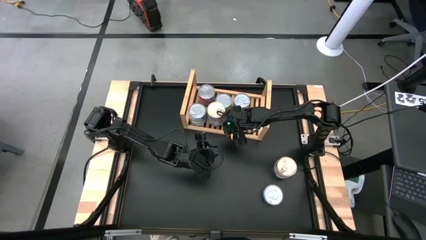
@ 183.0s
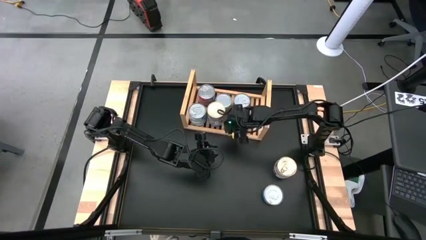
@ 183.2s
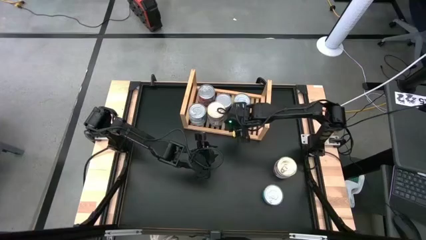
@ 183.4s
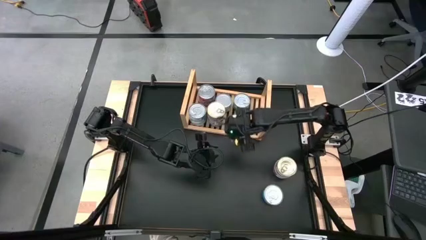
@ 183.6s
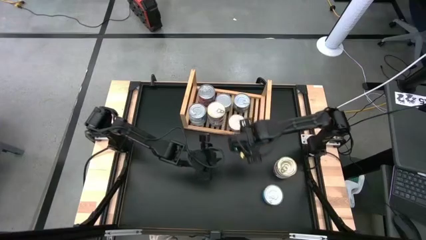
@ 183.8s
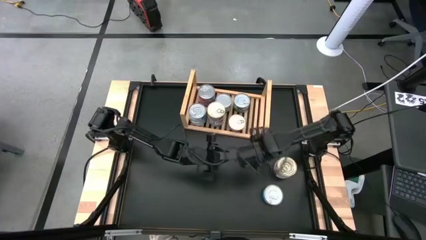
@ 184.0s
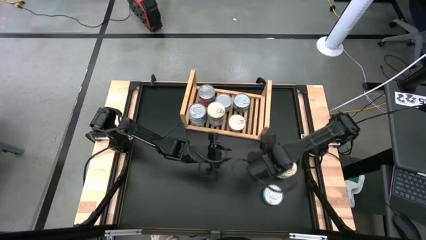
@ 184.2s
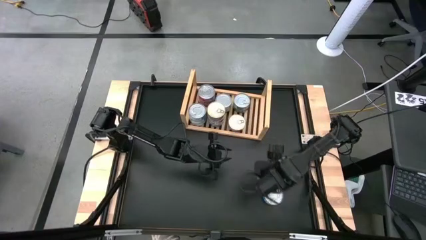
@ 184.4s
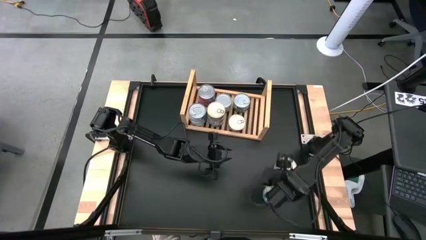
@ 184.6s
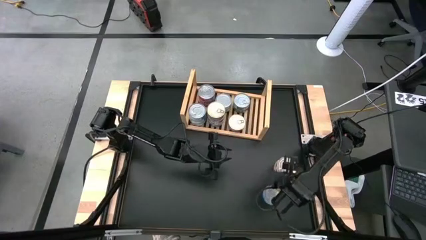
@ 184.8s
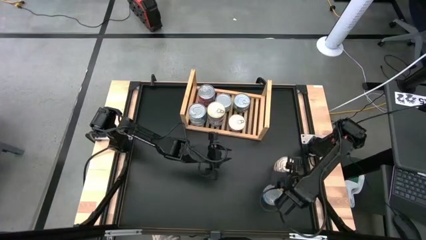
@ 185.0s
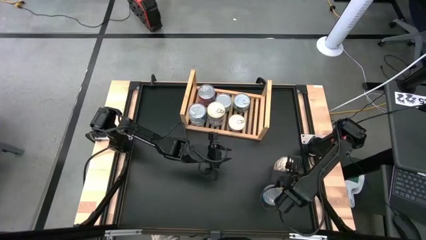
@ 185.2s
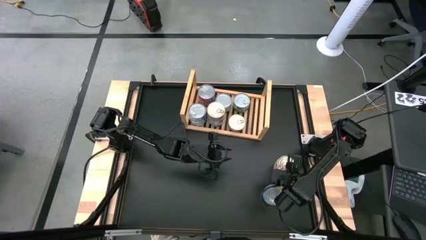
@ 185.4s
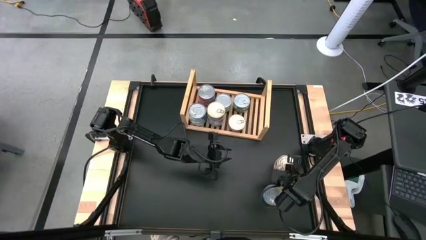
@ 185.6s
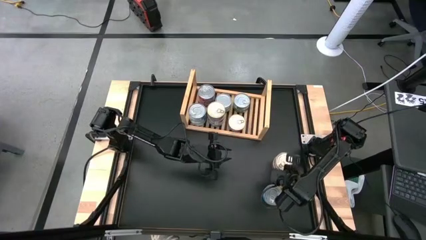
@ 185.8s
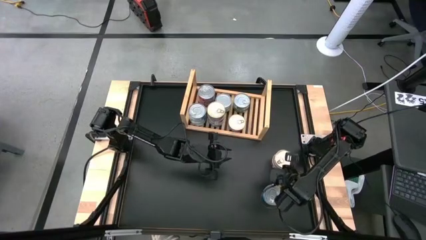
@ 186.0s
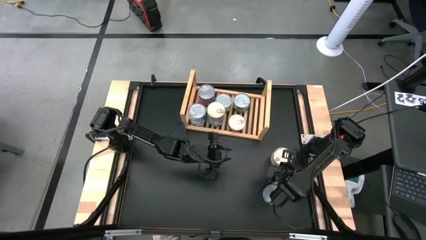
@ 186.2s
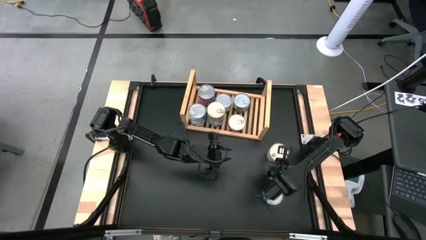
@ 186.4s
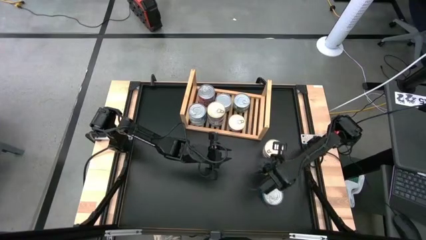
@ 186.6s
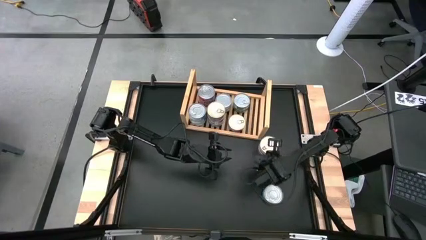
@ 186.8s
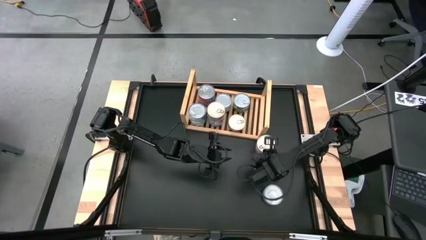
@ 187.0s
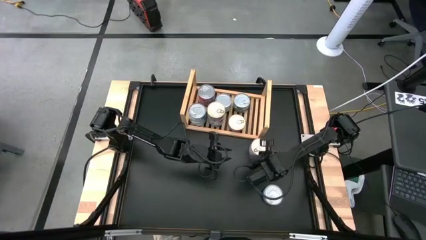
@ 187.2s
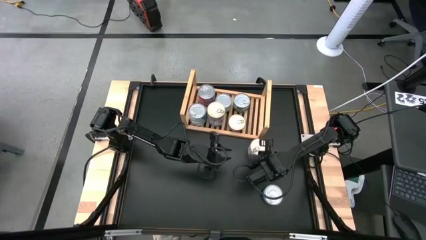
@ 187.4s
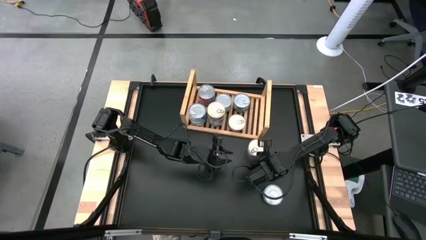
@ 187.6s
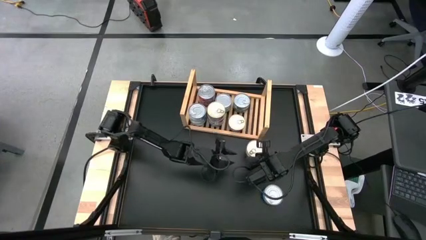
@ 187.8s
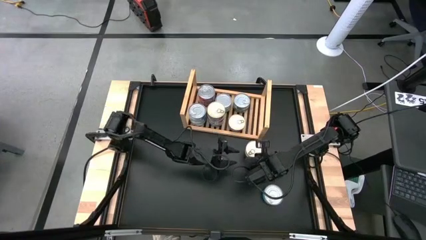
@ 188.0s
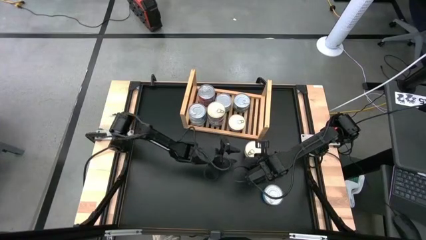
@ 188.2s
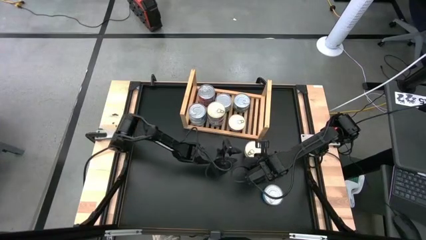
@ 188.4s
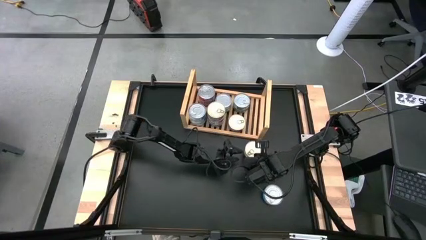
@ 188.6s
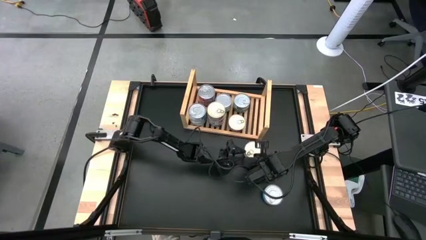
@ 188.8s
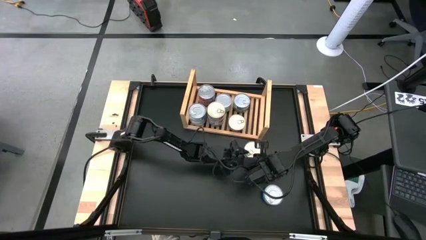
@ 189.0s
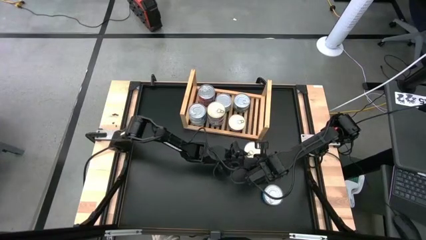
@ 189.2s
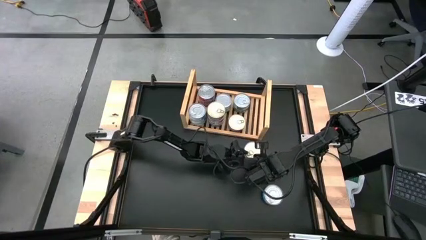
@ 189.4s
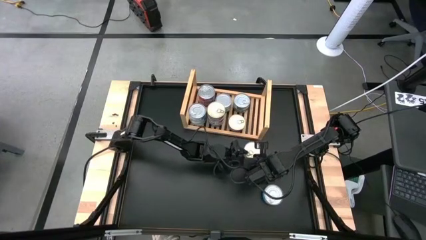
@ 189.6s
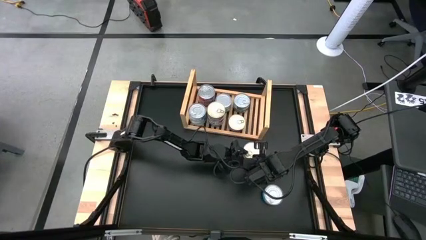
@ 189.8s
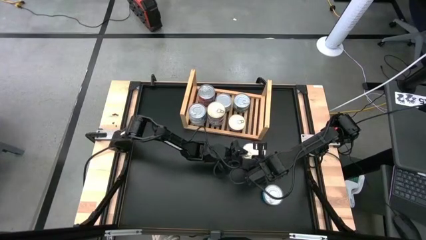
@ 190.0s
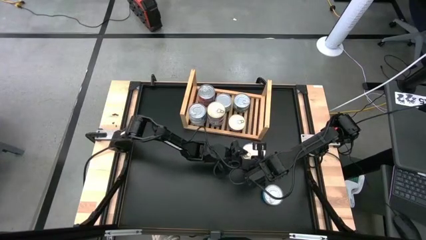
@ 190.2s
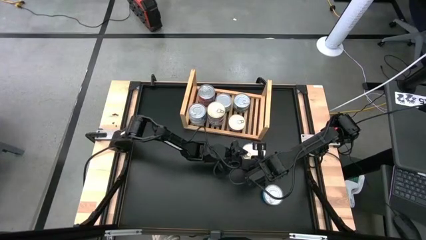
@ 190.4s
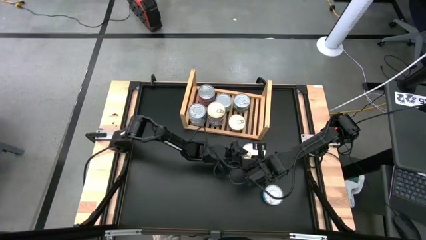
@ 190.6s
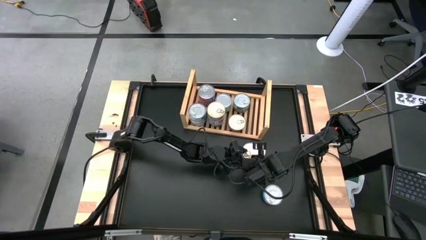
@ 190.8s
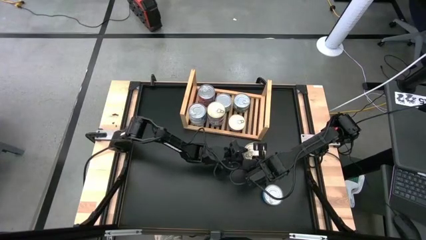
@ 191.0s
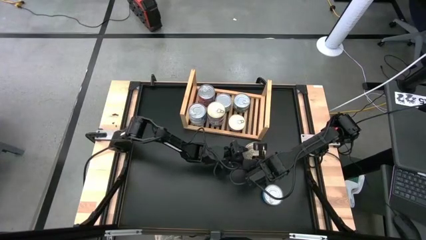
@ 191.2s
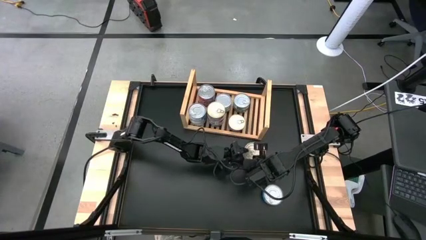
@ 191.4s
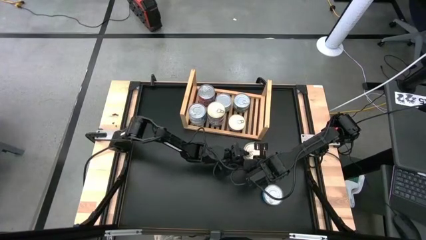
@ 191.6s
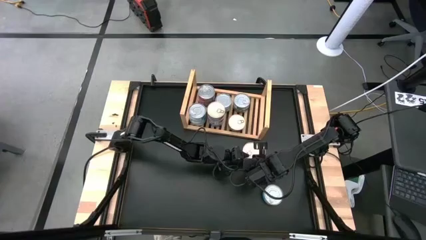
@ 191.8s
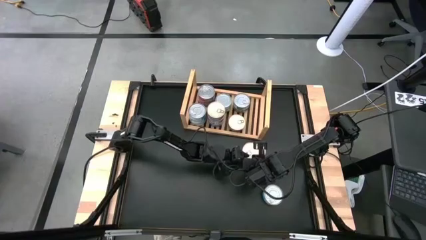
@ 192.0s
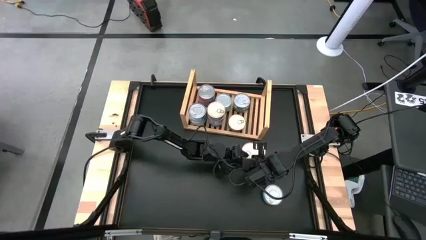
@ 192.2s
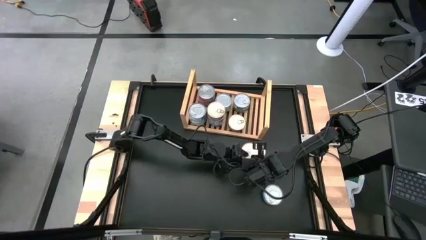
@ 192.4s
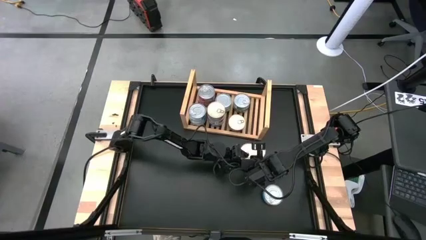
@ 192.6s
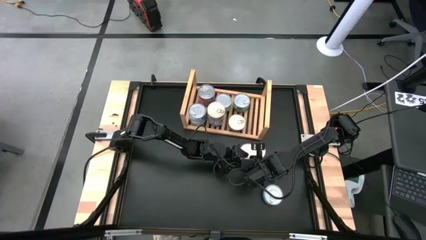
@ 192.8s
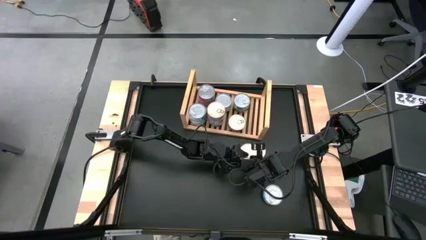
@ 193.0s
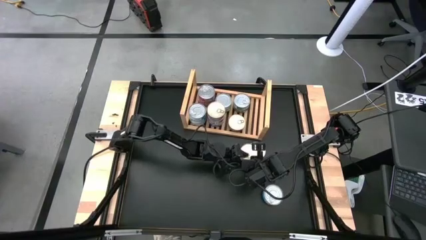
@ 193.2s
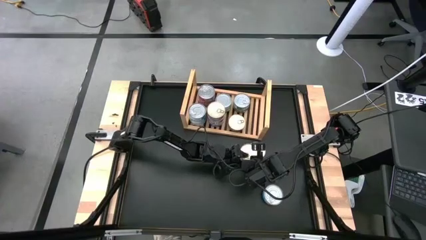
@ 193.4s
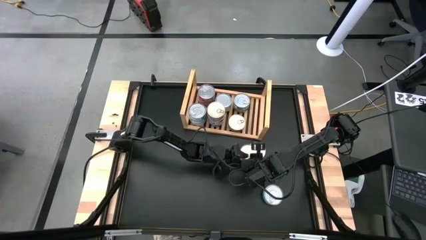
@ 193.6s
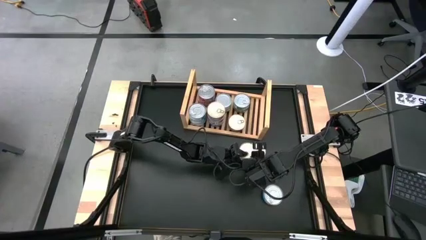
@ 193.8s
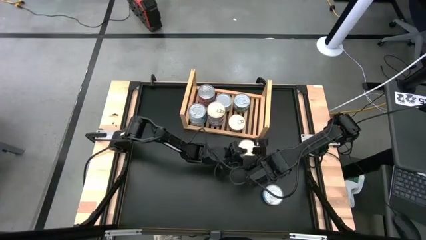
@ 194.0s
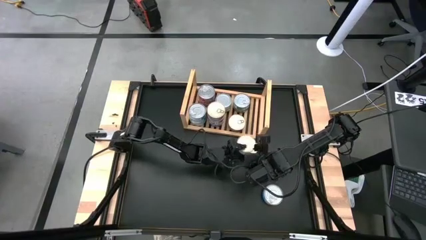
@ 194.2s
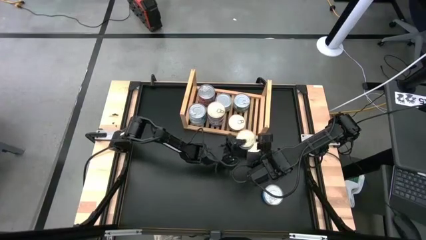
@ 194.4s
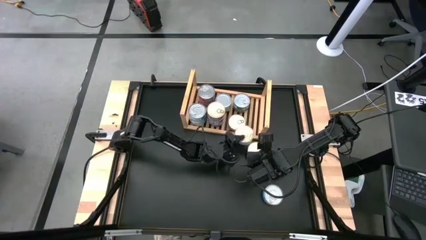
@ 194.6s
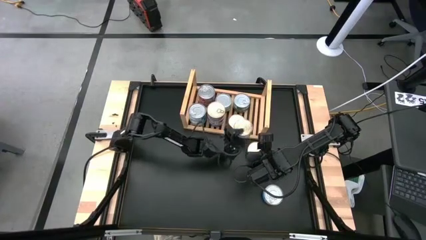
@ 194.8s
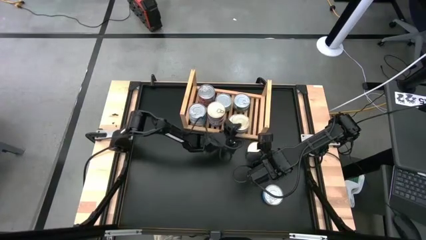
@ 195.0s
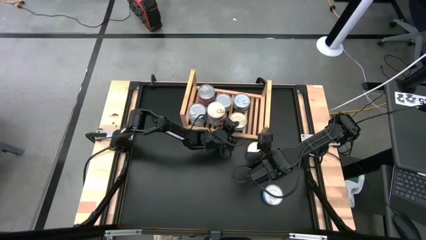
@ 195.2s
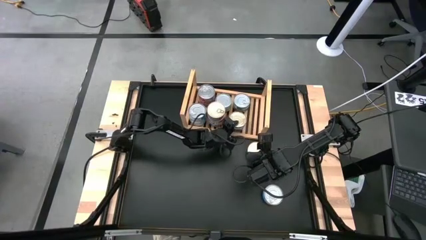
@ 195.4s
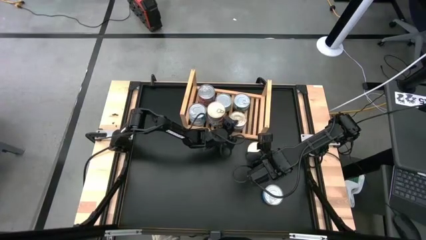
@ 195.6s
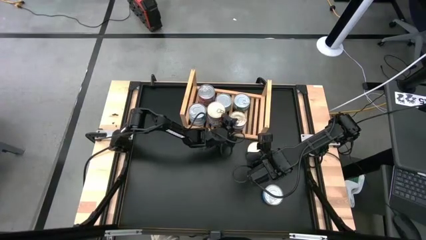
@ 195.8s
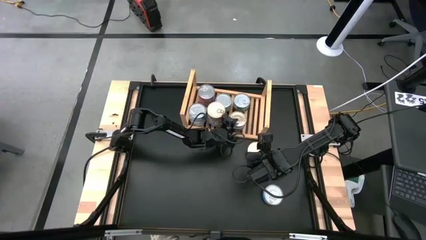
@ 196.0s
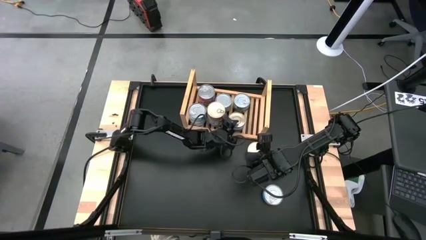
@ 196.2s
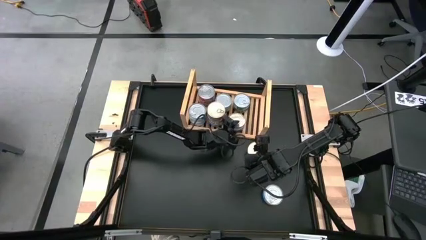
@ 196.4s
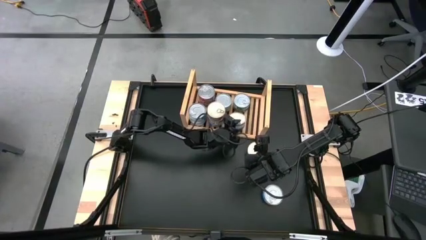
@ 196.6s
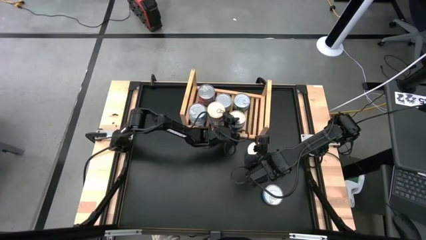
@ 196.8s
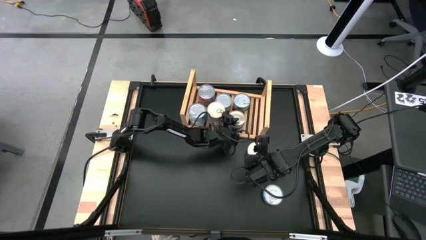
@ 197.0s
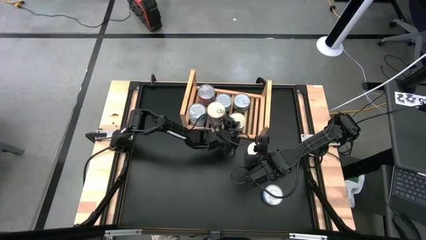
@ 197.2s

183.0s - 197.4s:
Task: Stack canned seafood by type on shelf
Stack the blue tuna can on top of the other blue tuna can on the shelf
